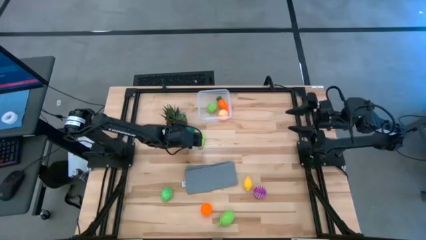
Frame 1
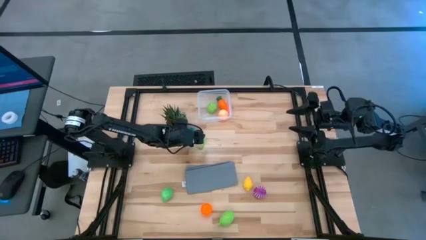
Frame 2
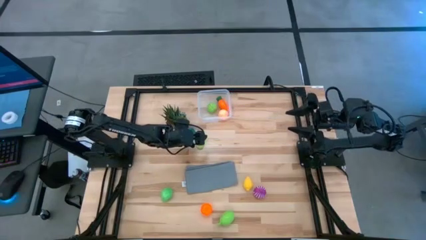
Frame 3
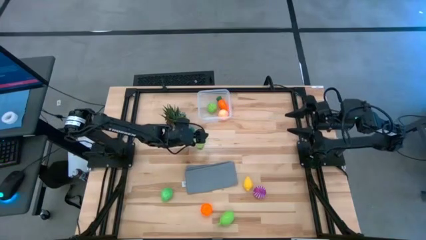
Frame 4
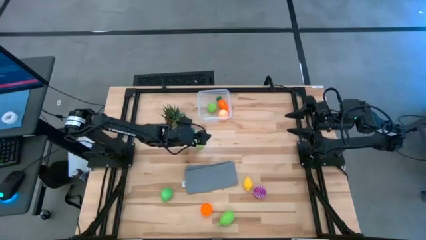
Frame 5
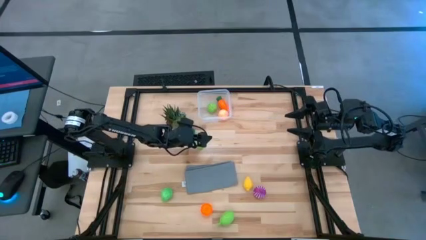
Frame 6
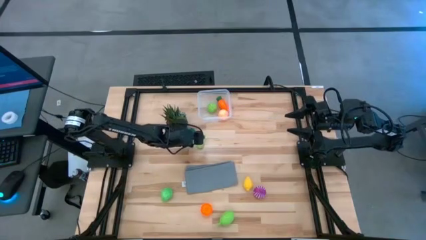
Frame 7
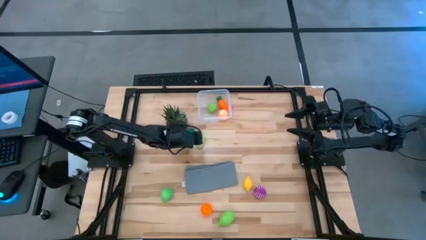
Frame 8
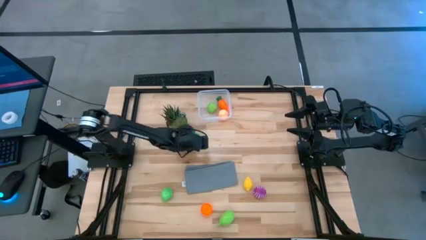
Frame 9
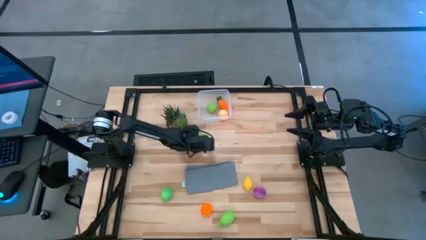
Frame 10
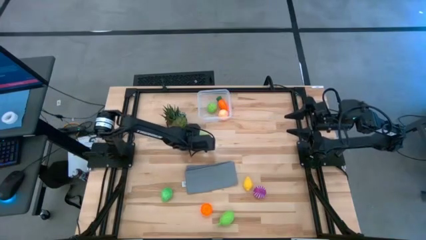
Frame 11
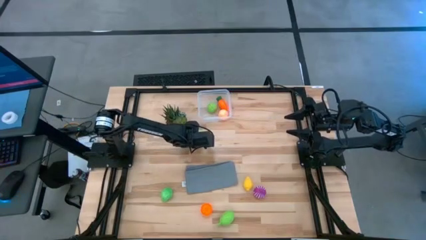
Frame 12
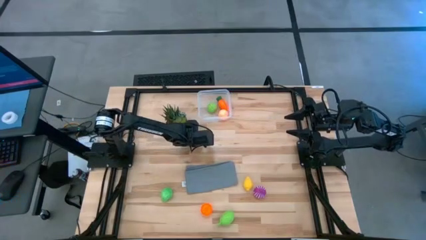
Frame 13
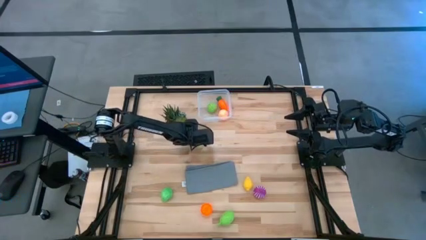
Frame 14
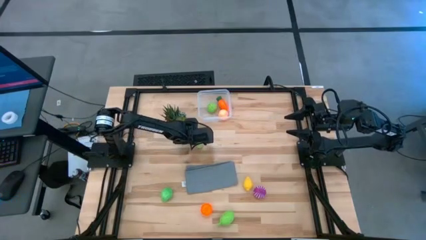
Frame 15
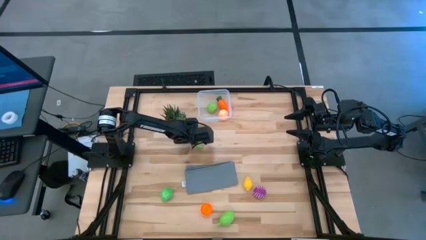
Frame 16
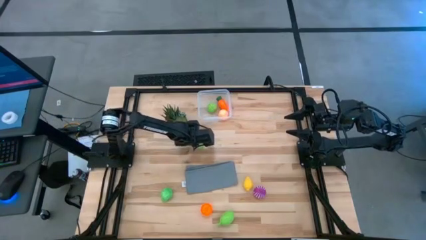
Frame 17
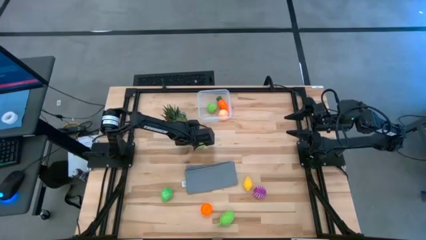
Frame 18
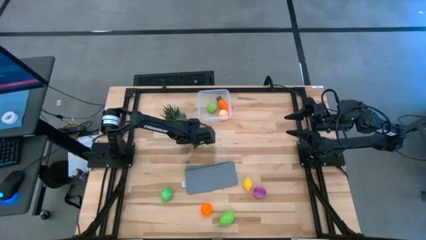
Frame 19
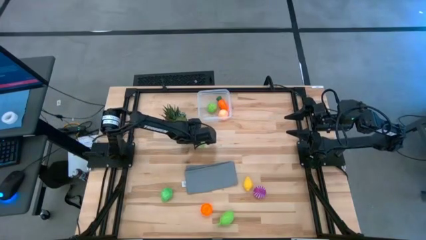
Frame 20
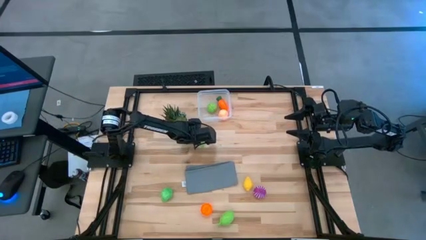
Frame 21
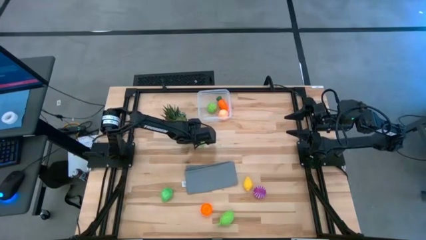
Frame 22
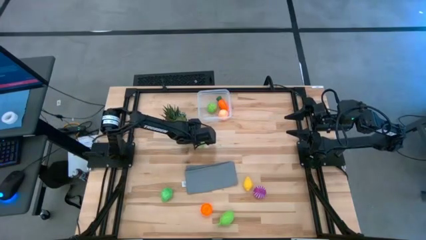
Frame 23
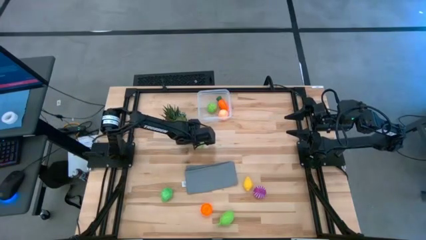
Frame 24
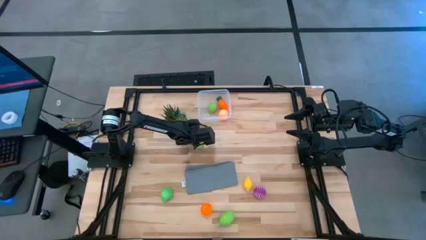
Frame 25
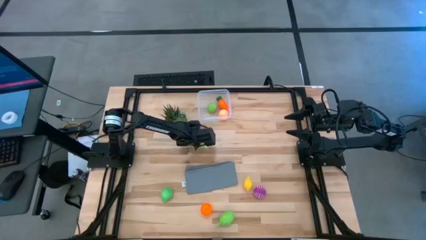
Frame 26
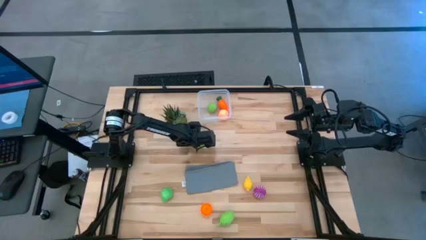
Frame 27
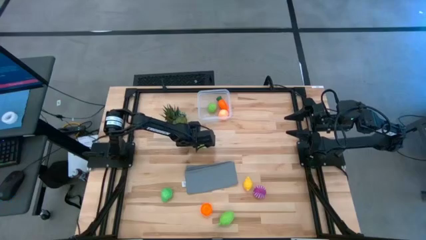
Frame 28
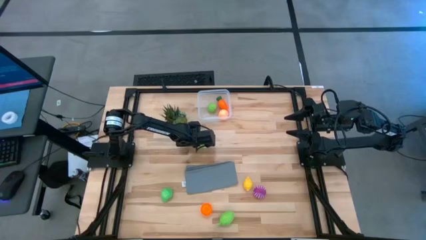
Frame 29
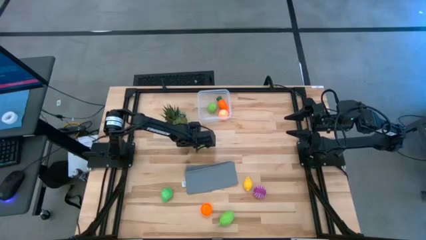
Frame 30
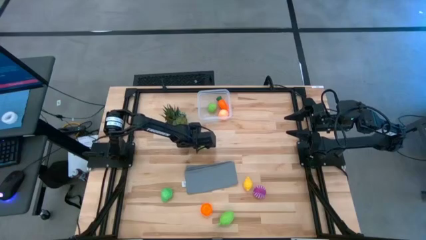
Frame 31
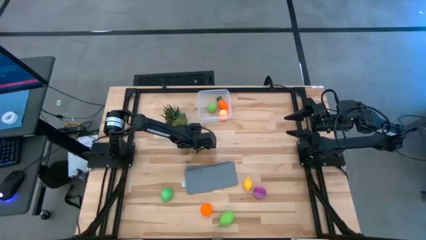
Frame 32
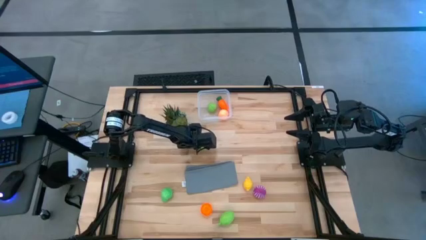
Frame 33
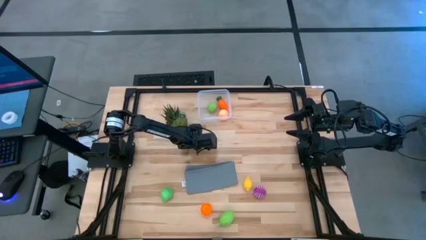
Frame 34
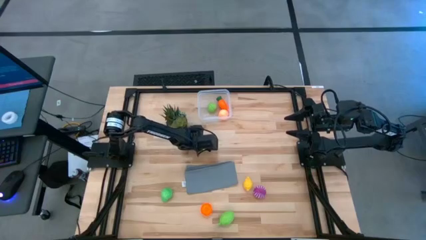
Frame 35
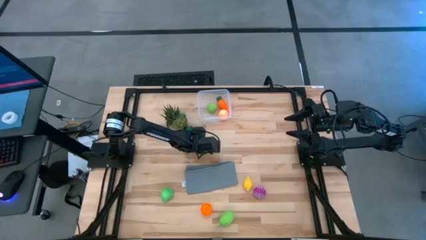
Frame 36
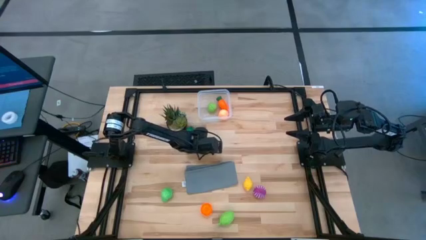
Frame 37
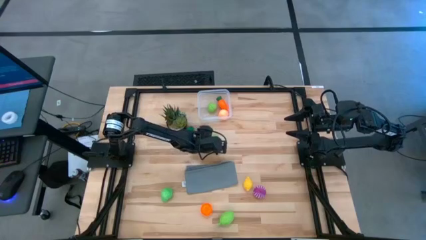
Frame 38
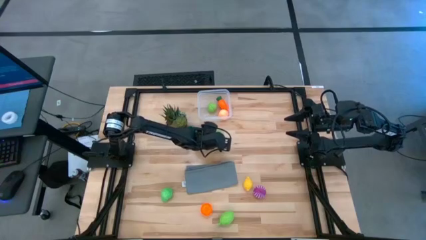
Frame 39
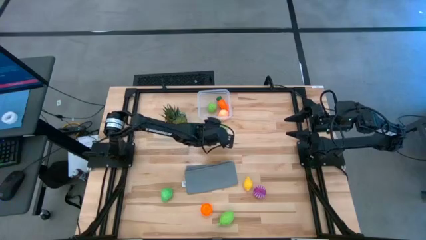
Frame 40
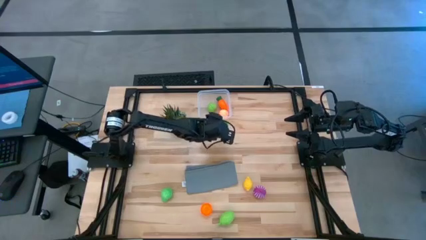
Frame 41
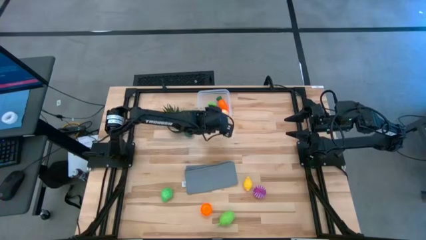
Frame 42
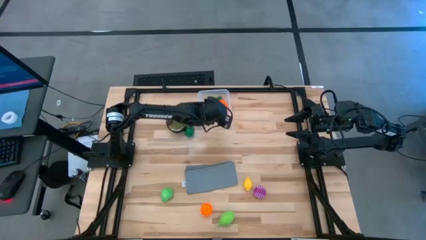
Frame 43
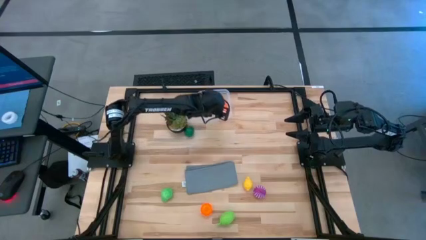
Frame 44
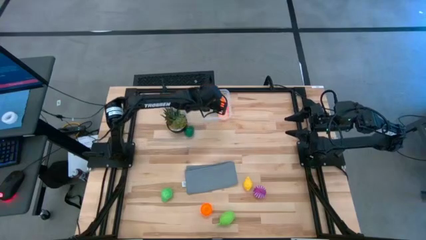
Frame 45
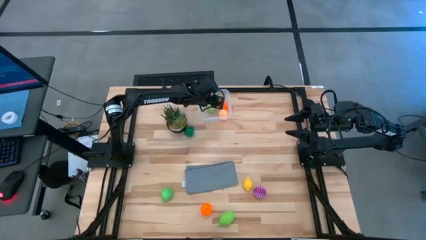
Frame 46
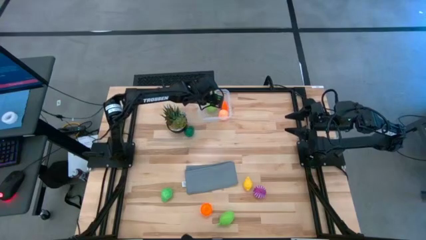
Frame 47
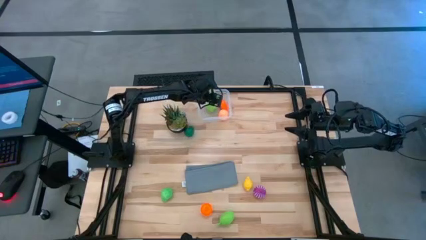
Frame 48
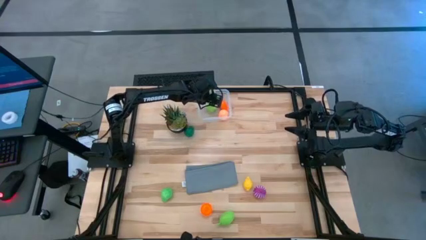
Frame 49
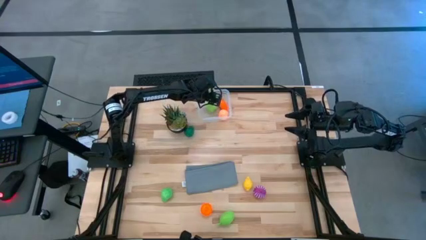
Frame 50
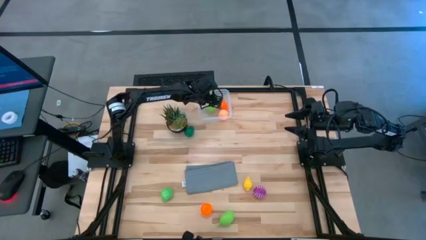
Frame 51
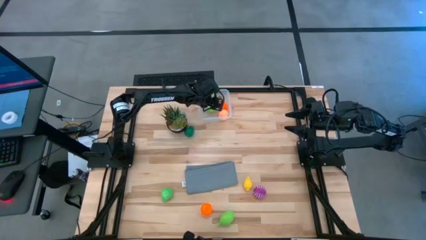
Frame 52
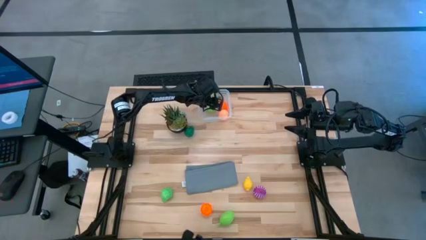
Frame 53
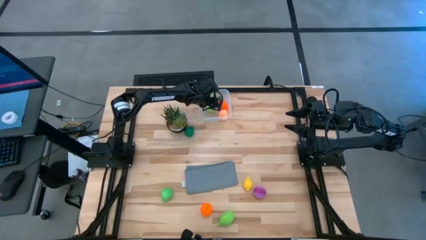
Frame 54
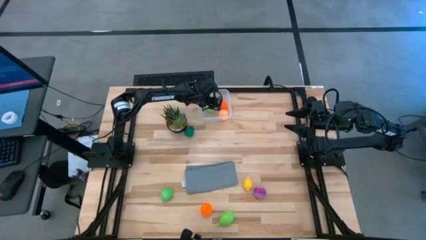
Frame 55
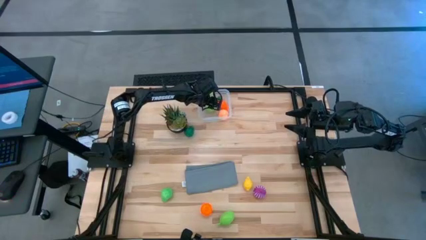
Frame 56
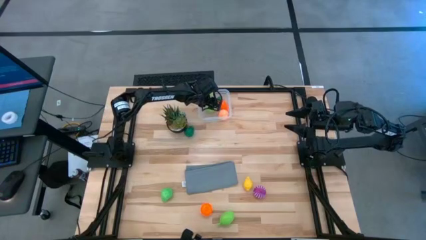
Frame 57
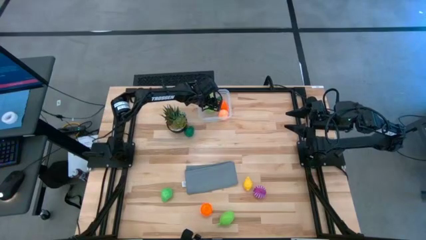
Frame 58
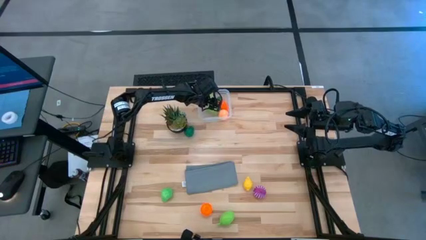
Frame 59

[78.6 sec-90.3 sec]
Task: Pick and placing Produce into tupperware
Put the starfruit into the bin

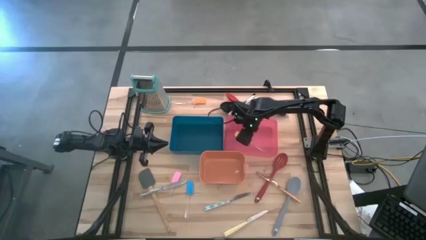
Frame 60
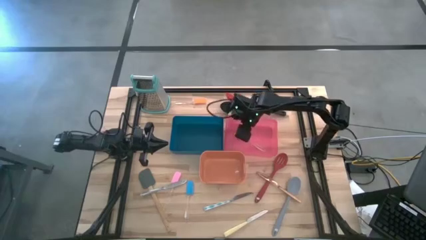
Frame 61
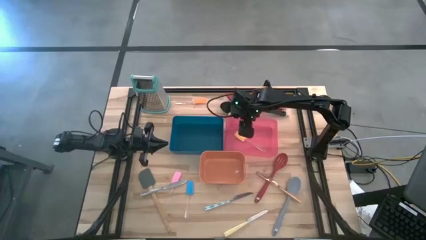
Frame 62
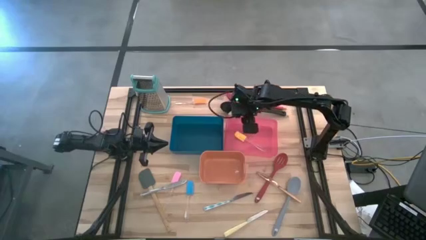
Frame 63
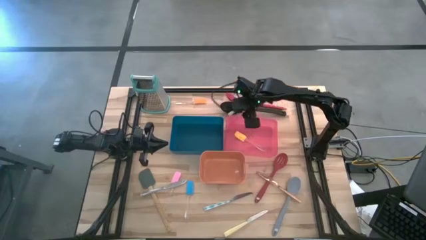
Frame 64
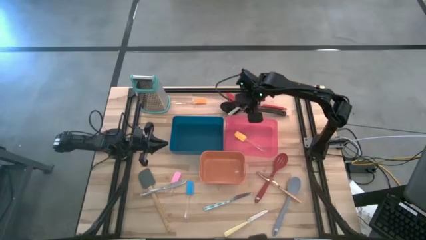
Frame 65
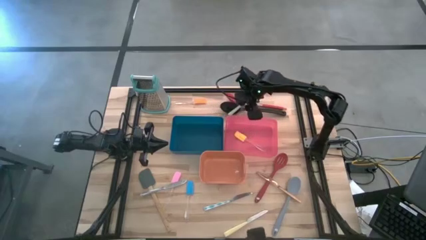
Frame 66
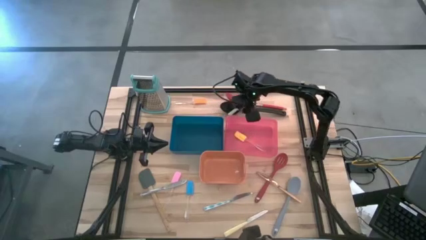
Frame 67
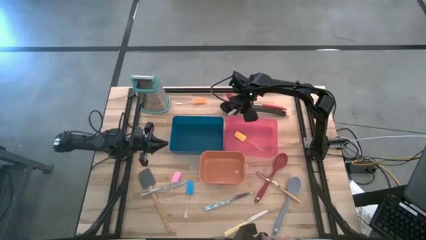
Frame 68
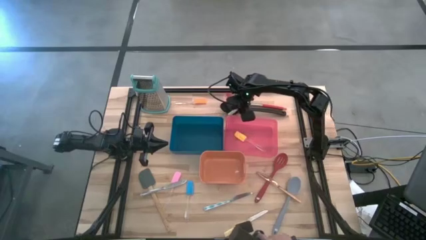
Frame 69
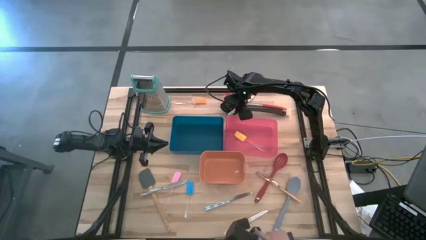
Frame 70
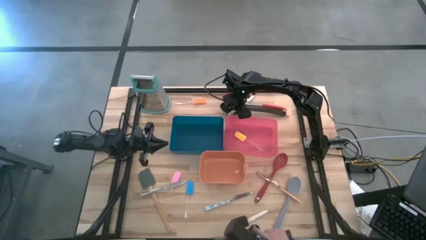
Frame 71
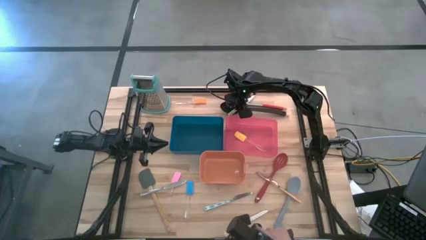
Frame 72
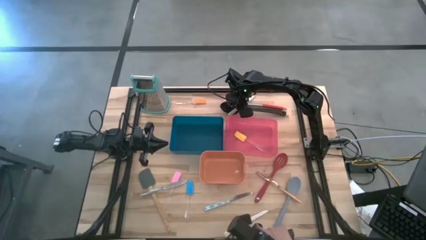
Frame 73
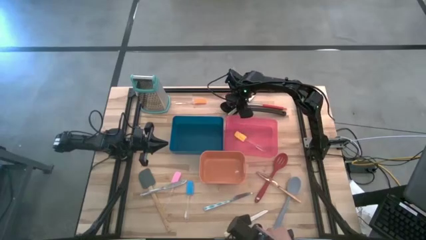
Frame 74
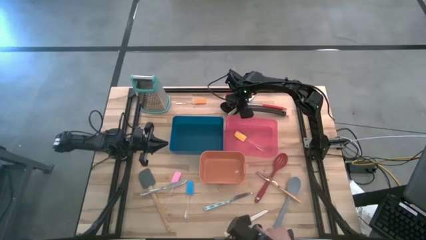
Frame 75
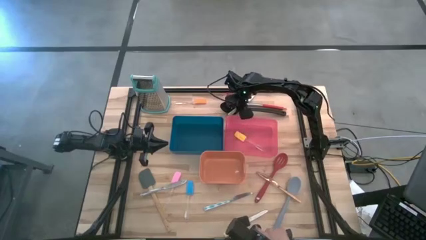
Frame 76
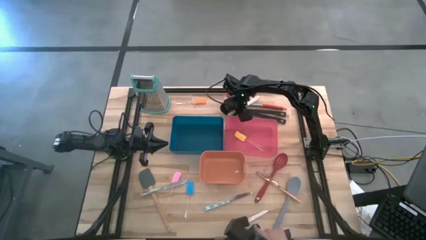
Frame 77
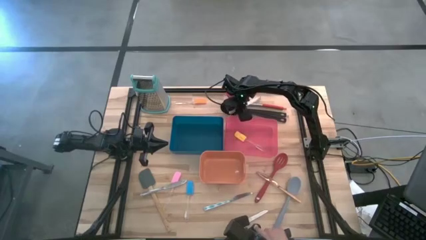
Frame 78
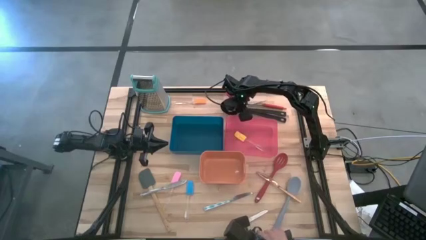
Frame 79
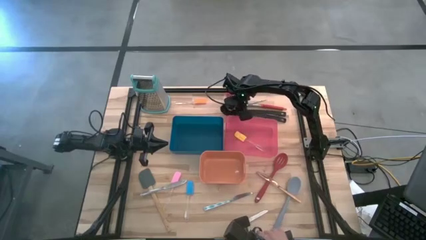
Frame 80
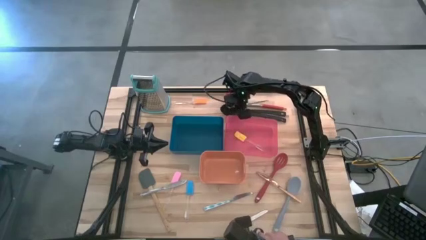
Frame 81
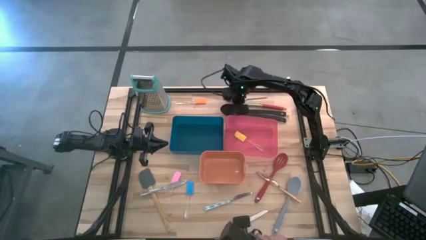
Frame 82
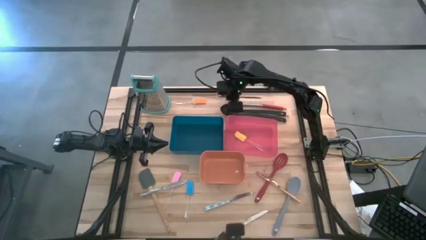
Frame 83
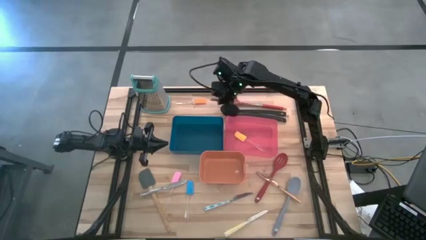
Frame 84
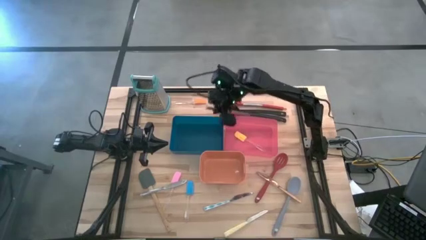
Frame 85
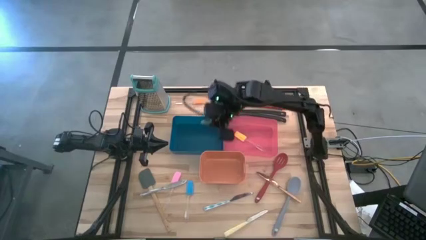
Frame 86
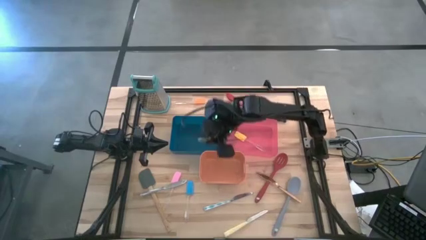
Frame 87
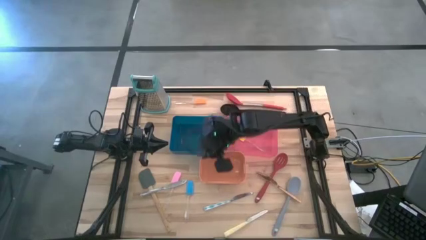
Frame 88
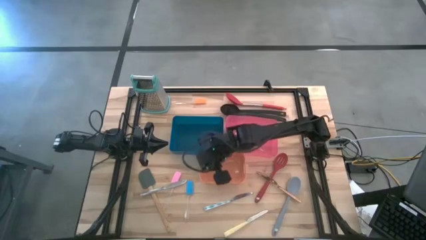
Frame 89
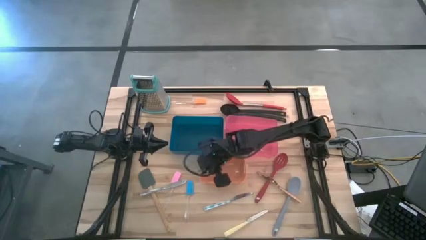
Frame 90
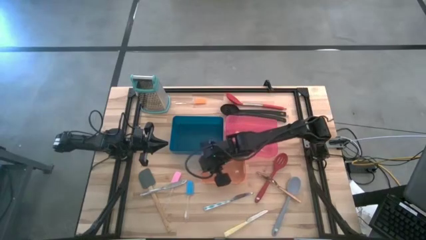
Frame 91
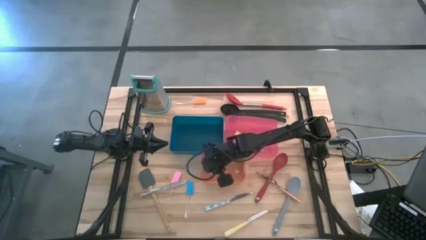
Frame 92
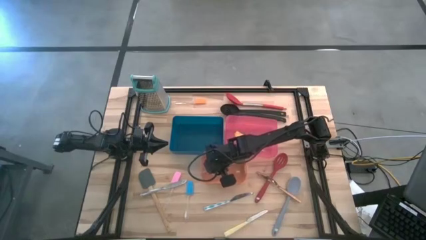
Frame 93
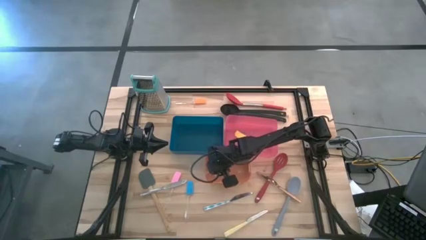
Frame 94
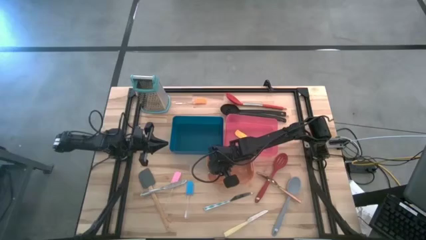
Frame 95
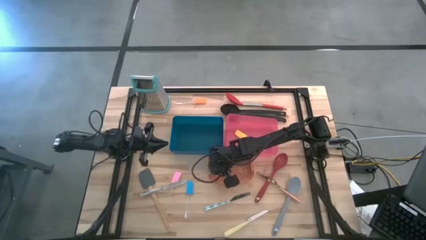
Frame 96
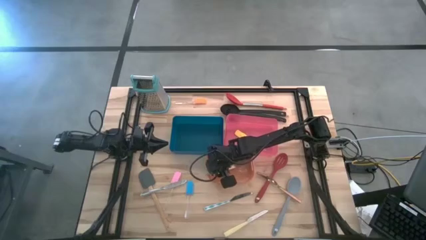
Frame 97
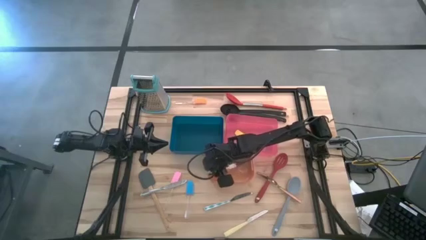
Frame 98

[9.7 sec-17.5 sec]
Task: Pick & Place Kitchen Items
Put the green knife into the orange bin
